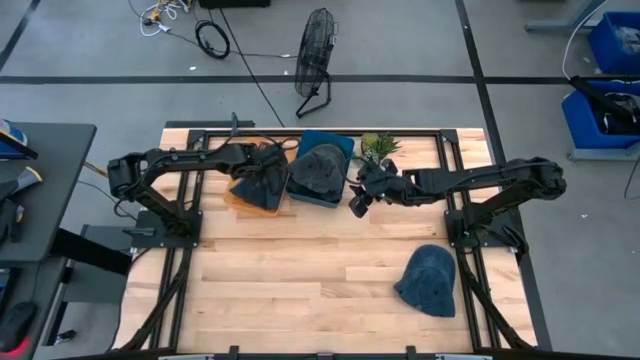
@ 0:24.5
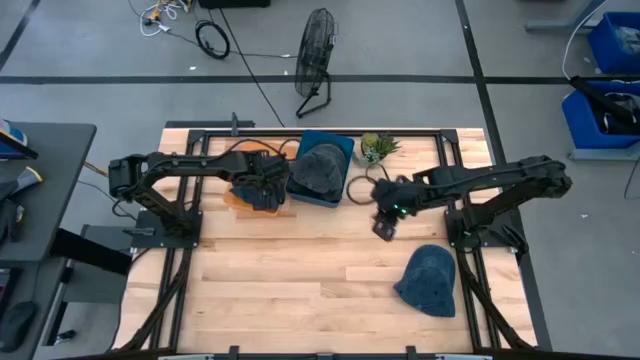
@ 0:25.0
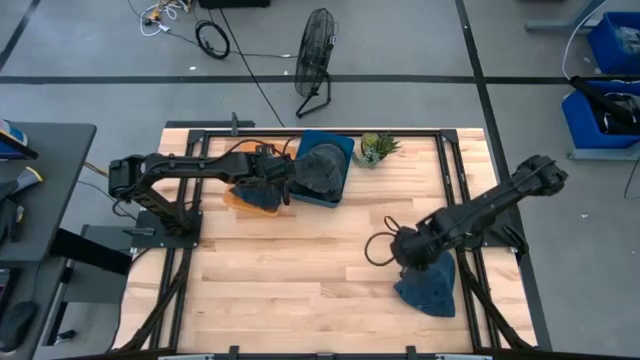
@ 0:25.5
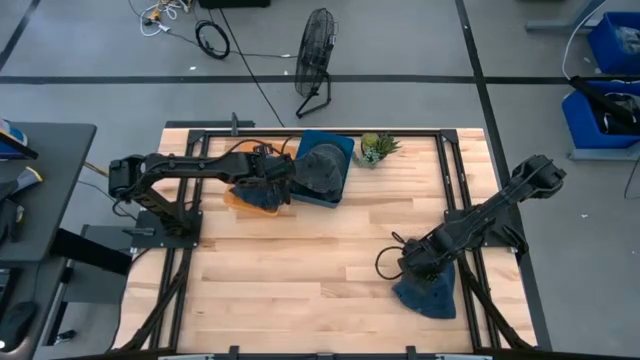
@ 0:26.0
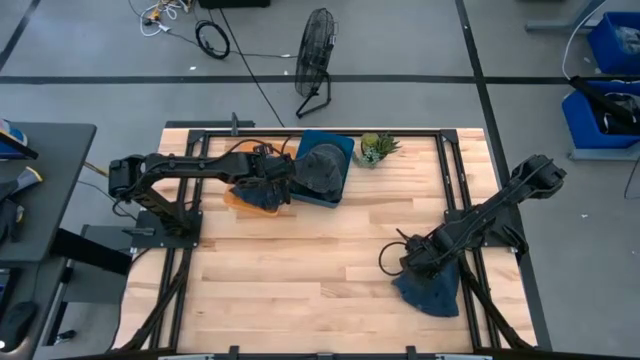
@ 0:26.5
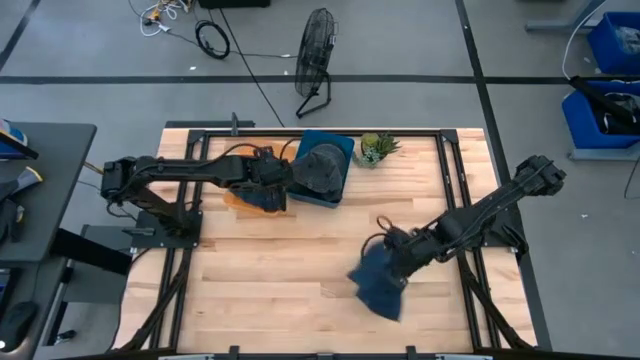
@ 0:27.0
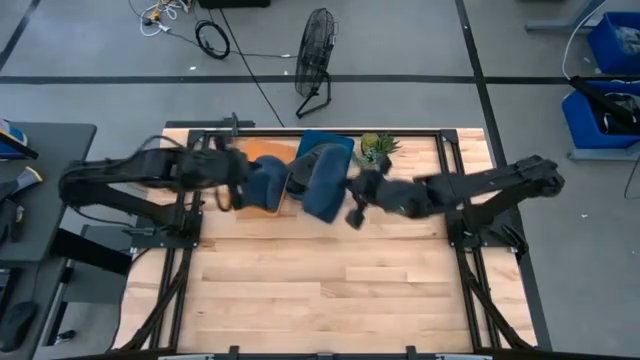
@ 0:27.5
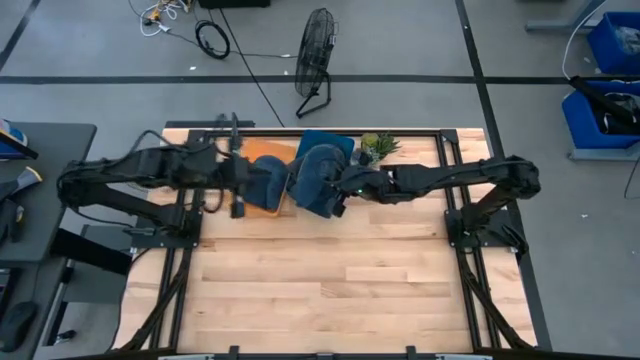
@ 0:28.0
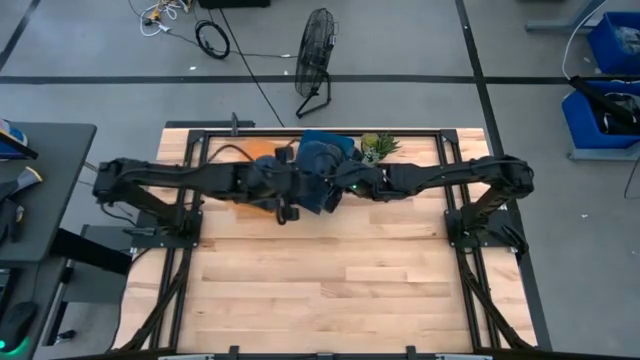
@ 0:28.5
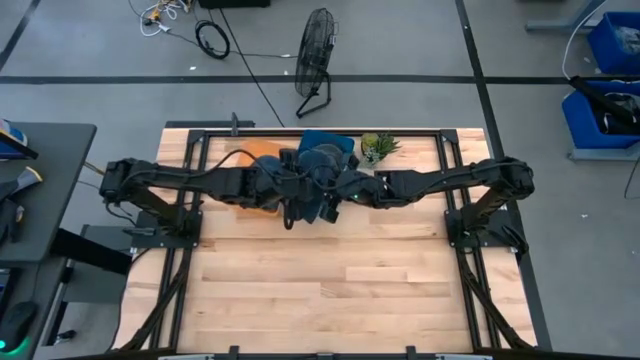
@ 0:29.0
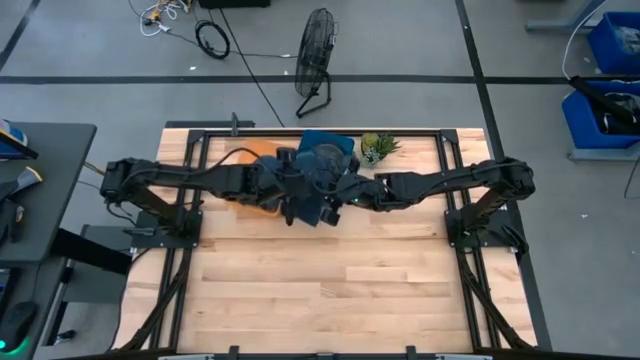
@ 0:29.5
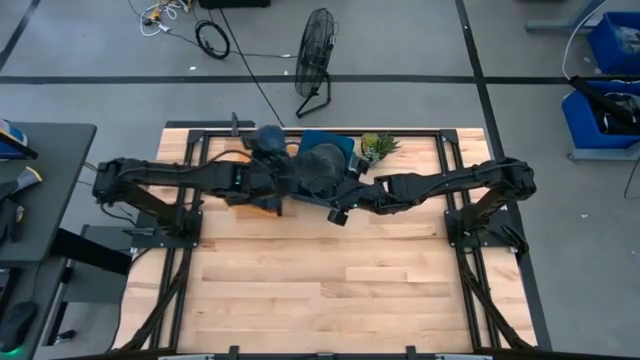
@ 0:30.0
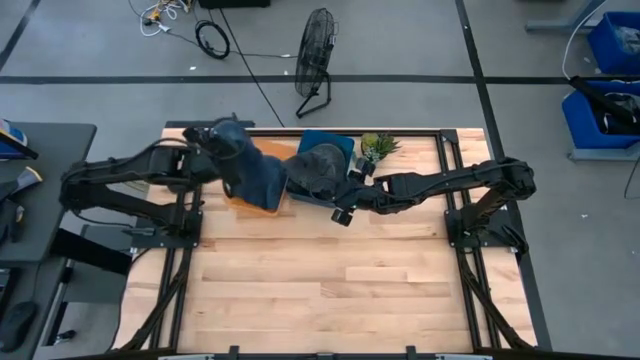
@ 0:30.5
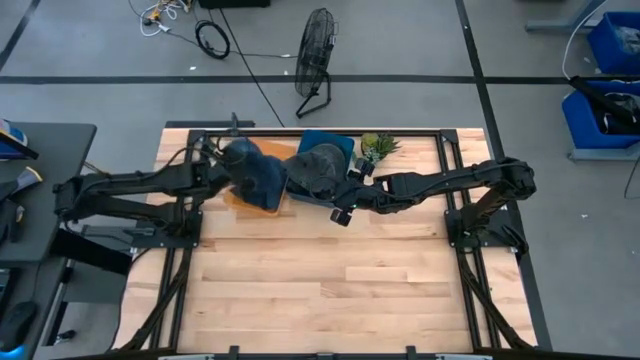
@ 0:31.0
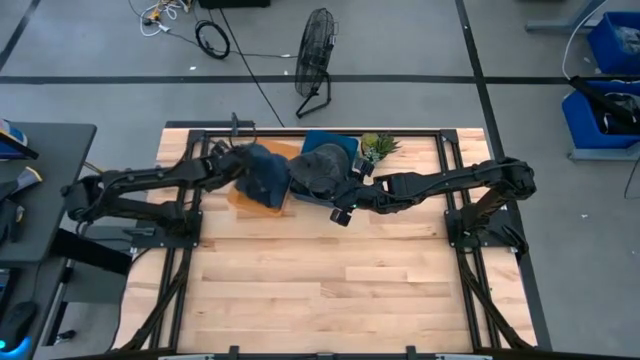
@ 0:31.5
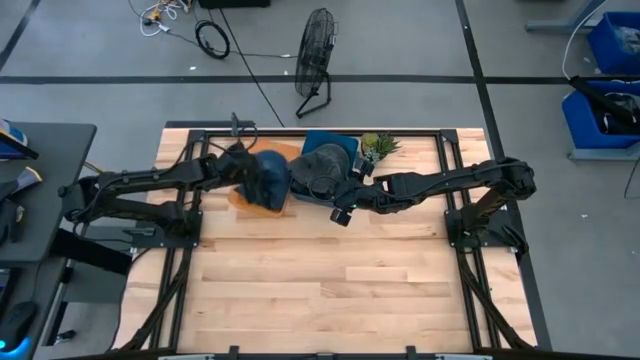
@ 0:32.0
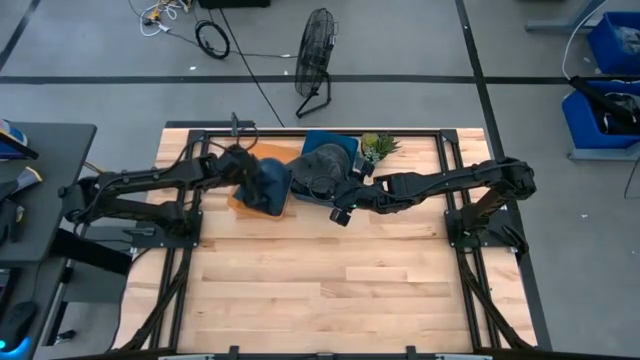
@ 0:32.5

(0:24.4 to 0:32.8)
Task: Pick & Place hat
Put the blue cap into the orange bin

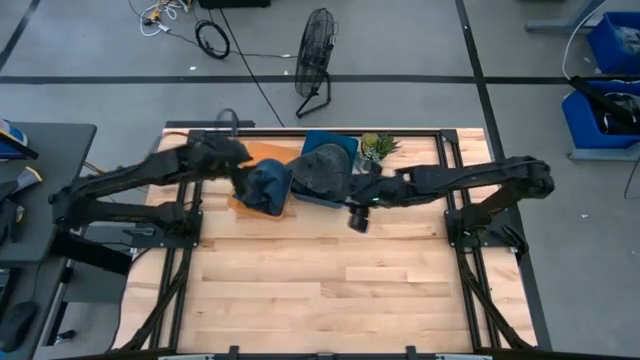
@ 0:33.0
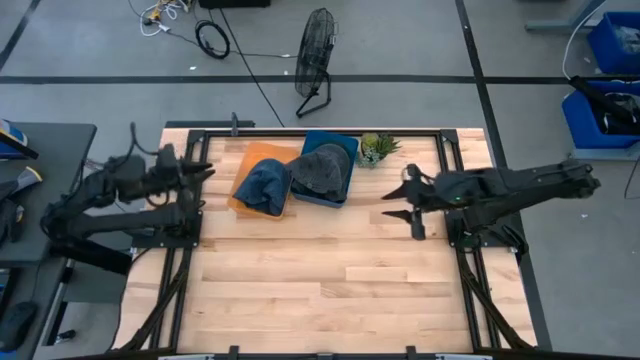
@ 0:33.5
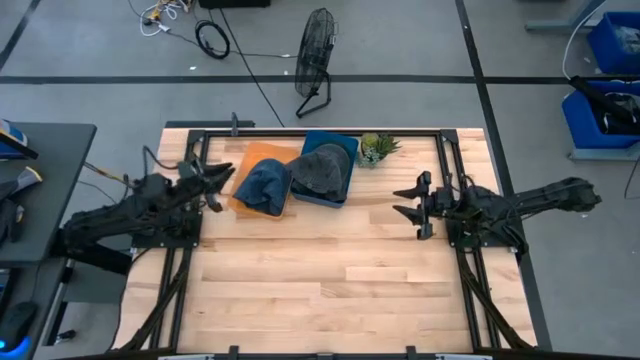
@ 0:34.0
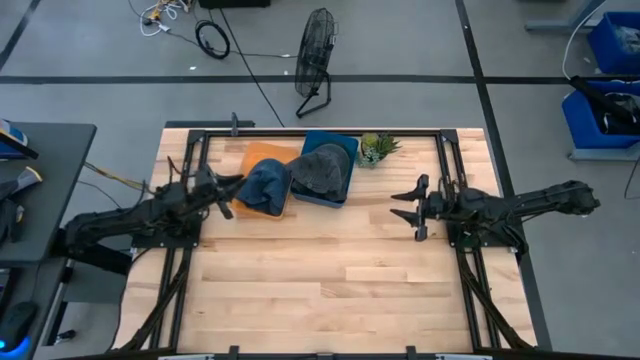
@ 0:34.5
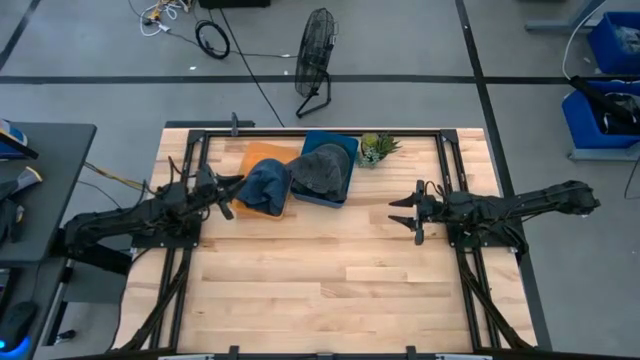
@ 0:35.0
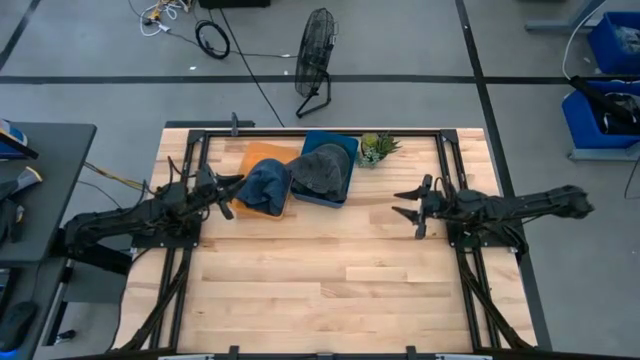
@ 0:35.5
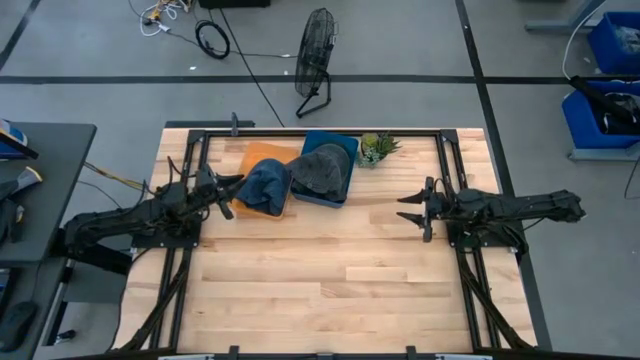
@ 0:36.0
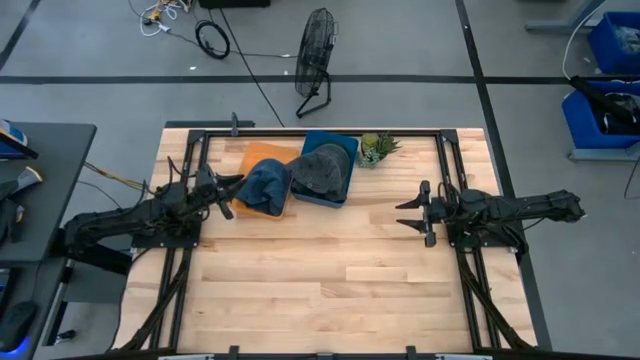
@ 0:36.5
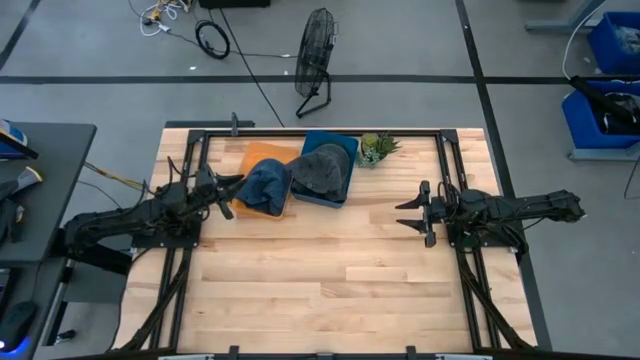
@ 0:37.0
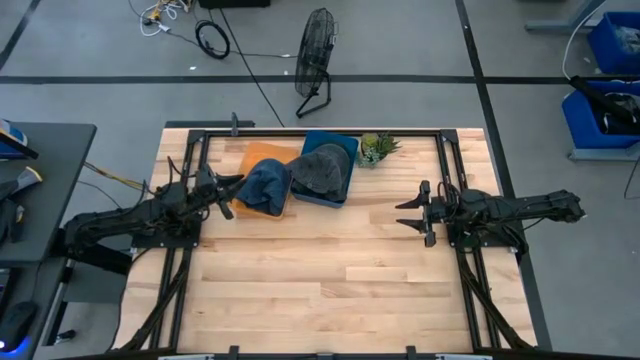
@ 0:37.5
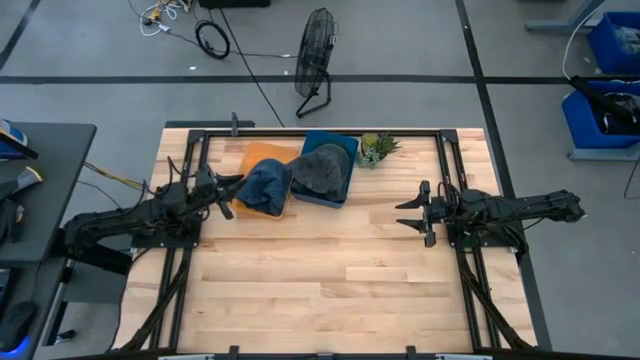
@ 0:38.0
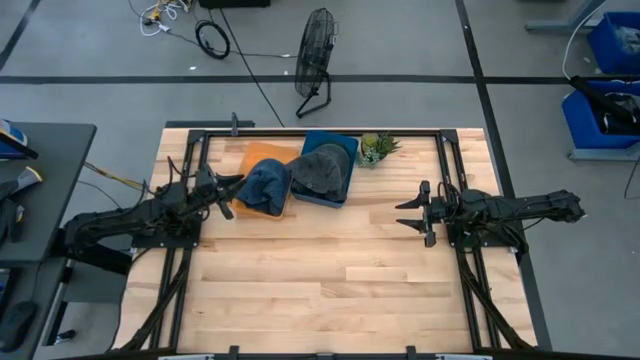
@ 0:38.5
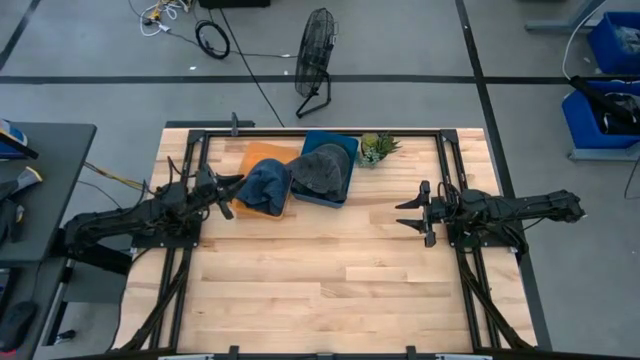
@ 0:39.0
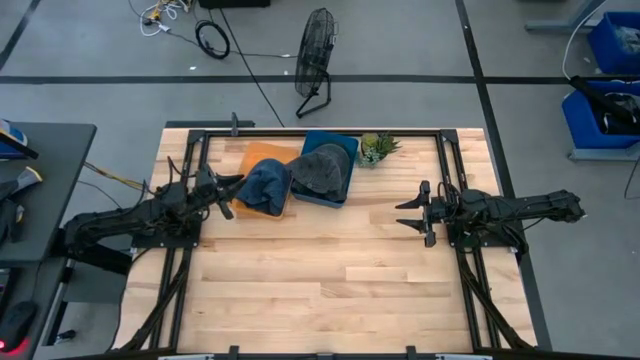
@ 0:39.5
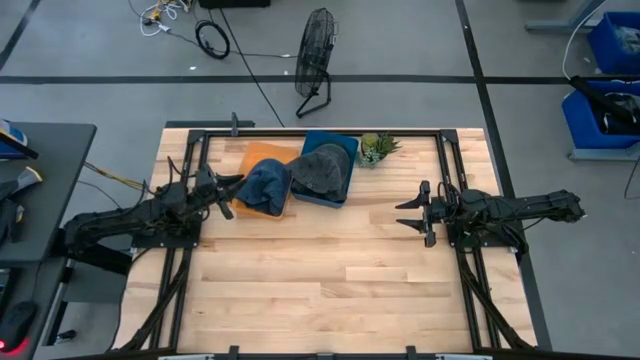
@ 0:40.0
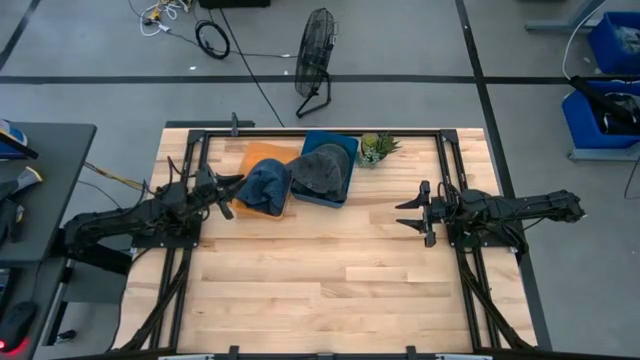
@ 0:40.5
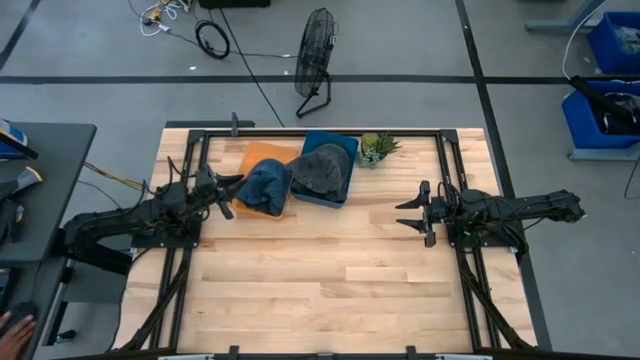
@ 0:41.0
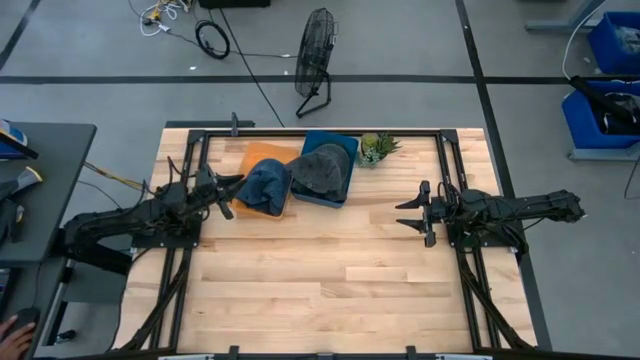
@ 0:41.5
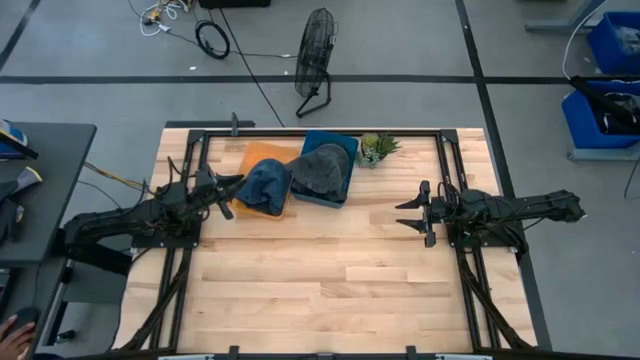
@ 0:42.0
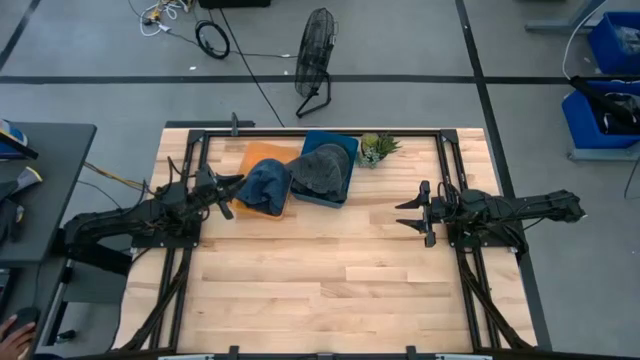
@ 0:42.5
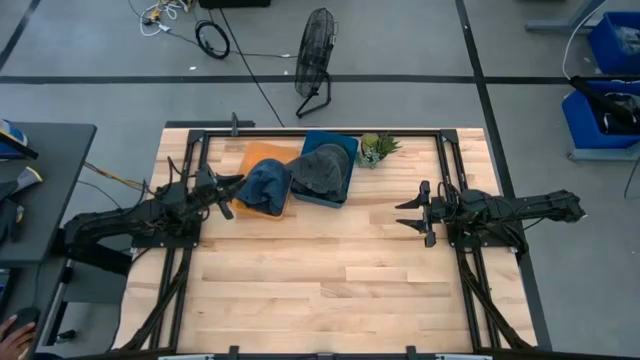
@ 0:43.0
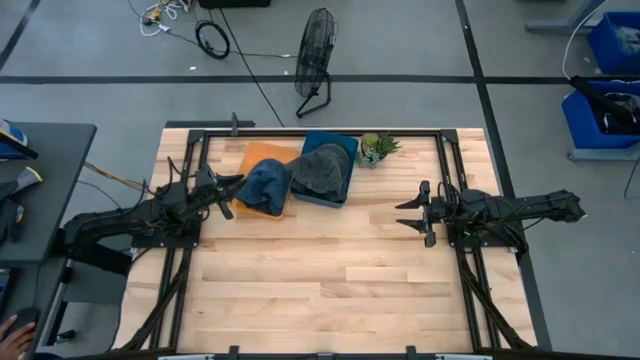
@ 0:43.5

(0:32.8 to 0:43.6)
Return to Home Position
